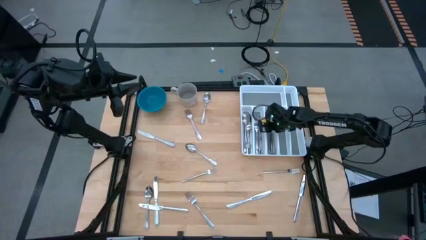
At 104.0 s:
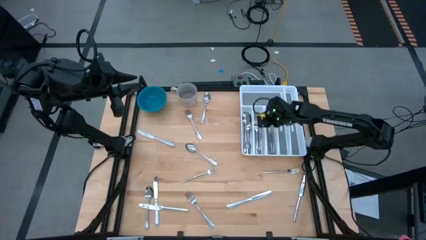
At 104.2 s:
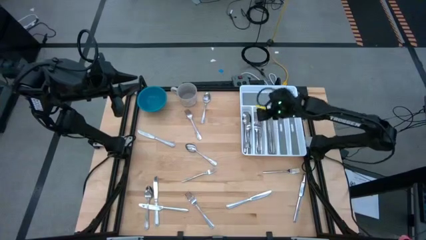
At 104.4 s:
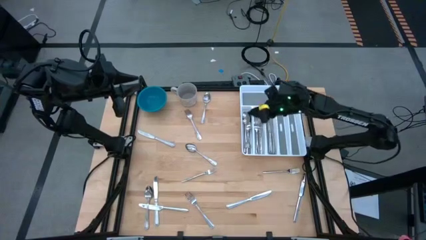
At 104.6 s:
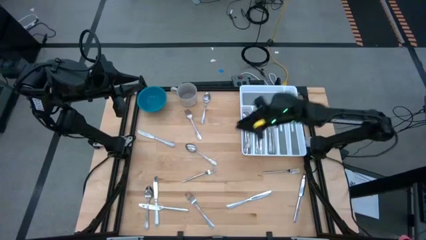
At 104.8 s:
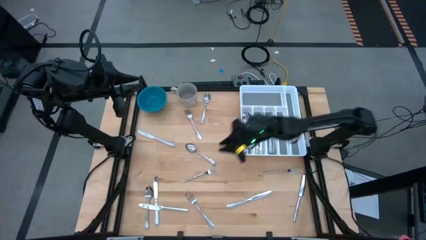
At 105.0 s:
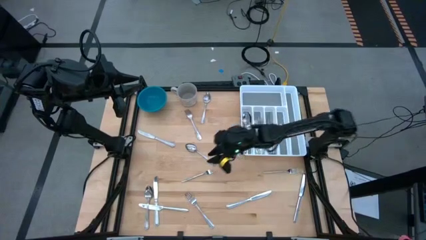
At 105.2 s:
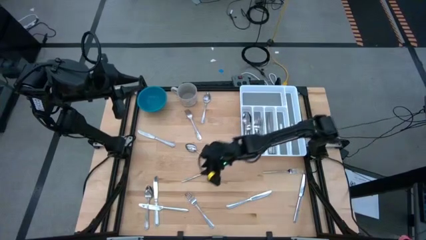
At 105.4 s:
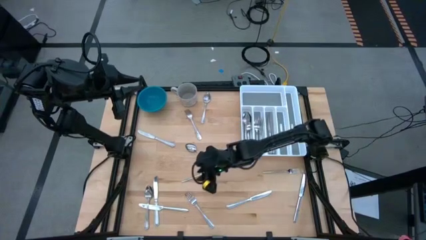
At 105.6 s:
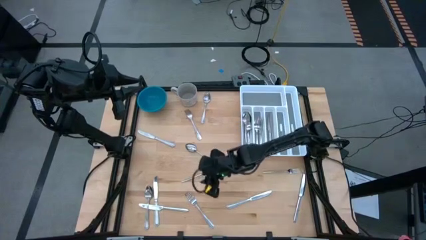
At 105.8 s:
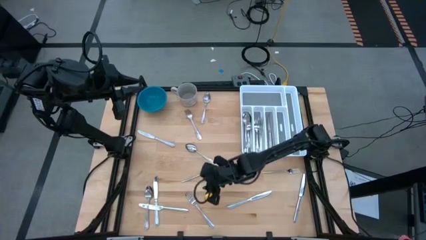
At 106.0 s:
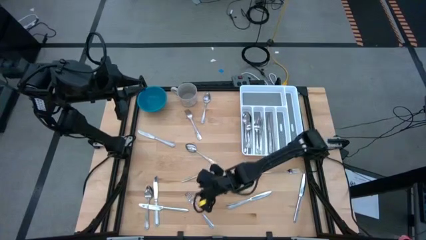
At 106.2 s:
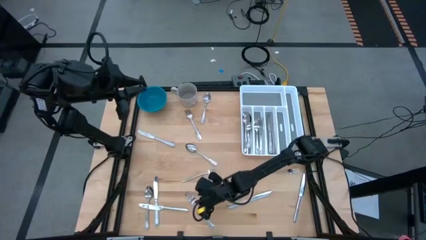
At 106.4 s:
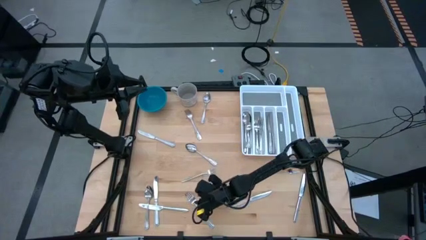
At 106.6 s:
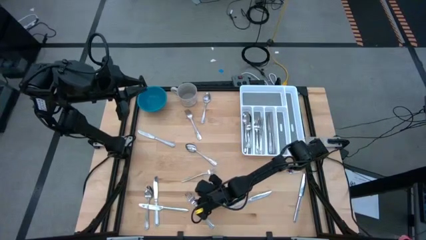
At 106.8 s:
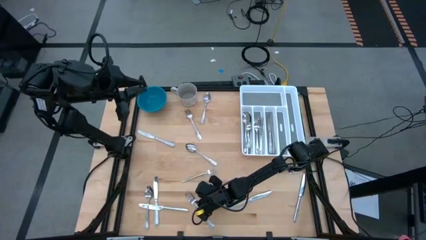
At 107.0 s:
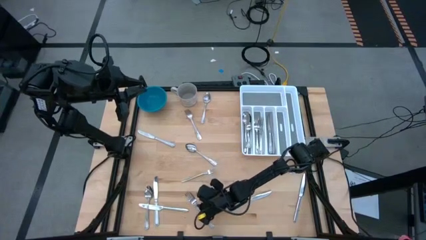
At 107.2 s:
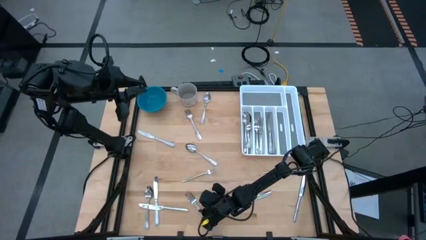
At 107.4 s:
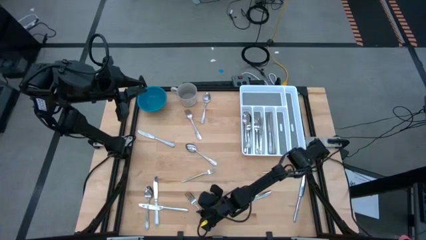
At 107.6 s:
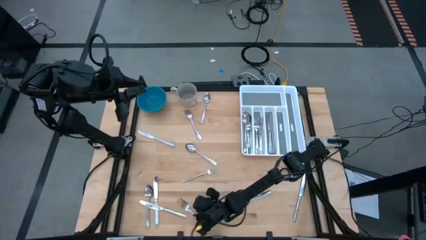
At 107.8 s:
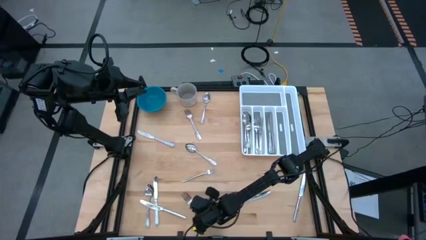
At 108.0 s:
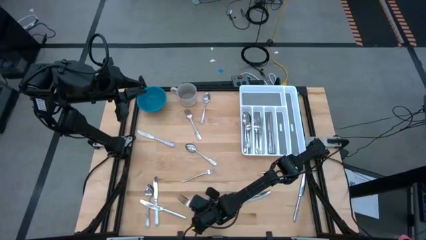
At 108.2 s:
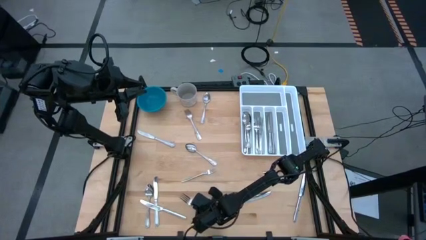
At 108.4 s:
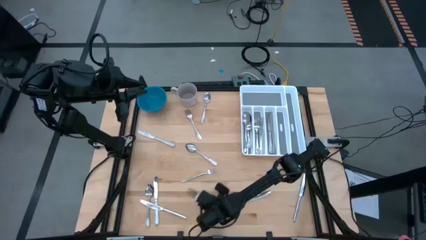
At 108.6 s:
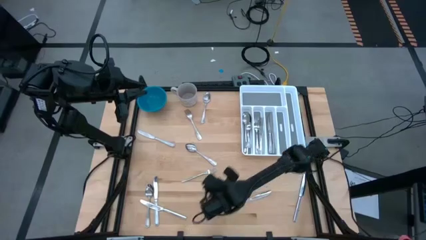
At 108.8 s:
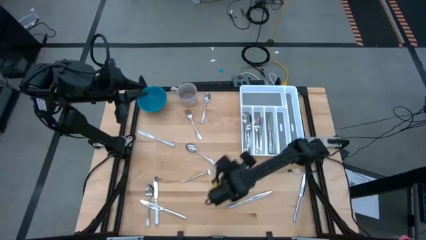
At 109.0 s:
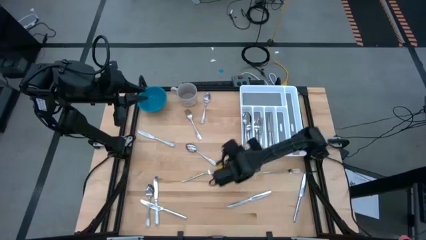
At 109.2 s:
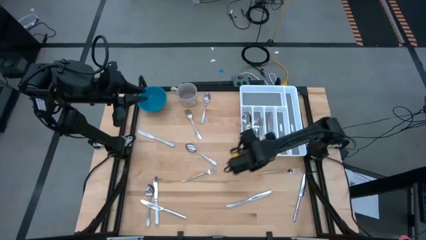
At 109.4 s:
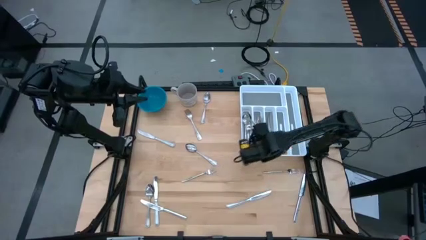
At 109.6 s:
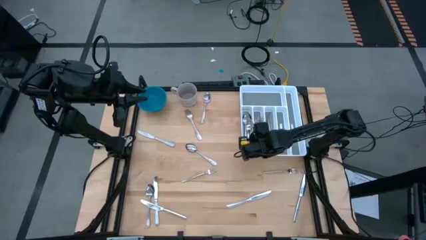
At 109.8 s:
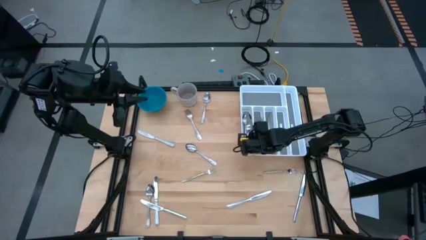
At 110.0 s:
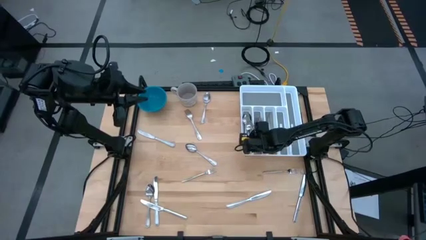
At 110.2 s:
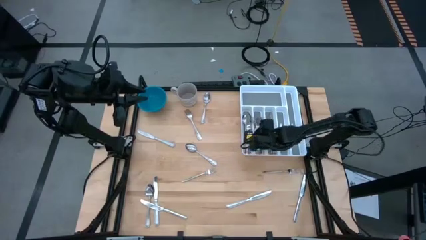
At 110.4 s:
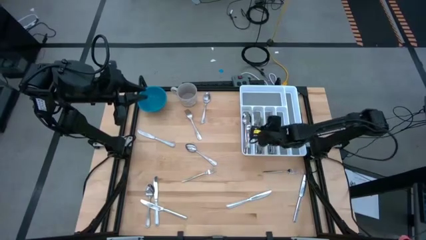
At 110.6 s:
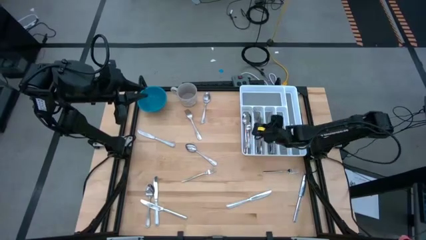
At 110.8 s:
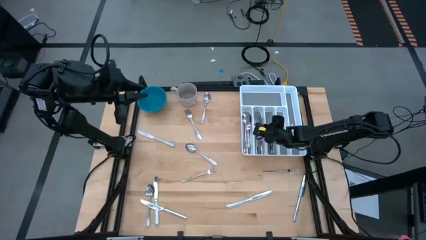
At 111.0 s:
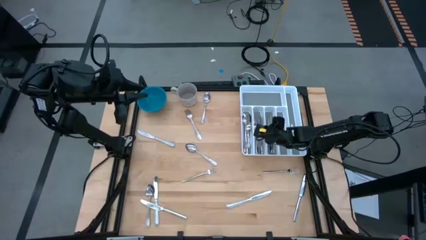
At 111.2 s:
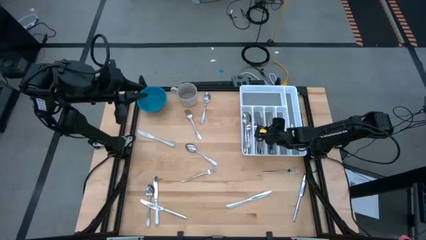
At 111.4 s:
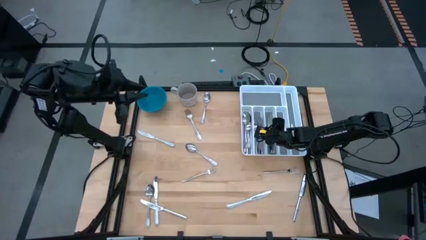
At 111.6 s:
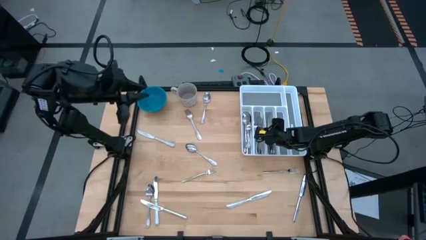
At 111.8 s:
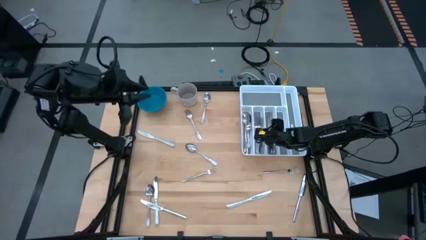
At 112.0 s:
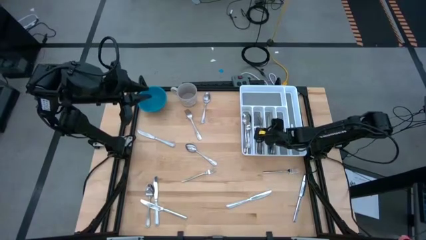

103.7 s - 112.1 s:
Task: Sort silverware
Put the fork in the silverware tray

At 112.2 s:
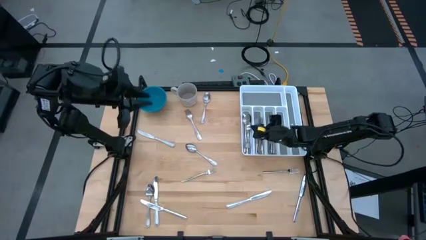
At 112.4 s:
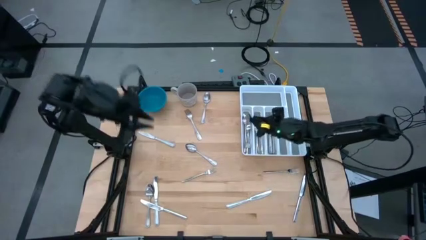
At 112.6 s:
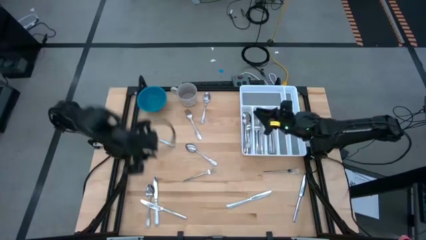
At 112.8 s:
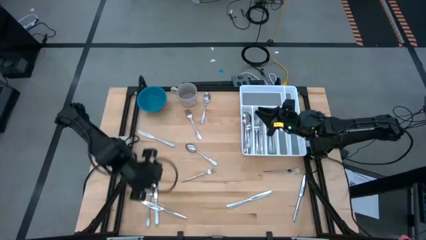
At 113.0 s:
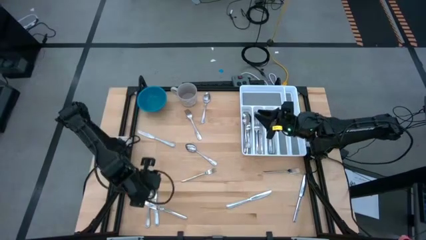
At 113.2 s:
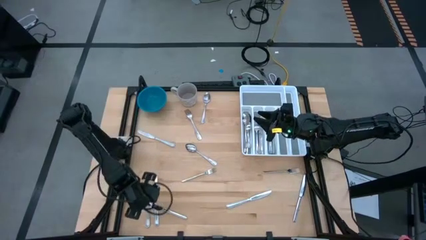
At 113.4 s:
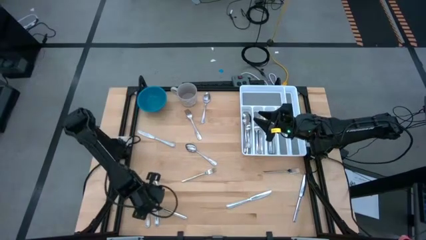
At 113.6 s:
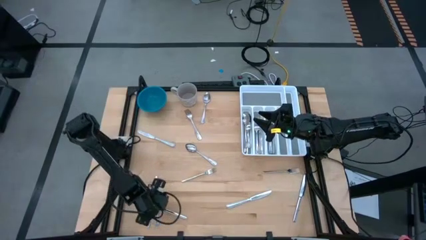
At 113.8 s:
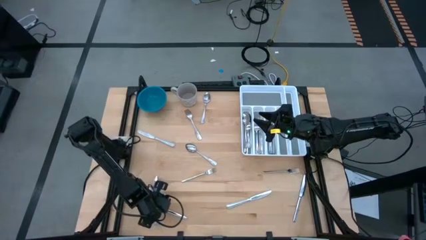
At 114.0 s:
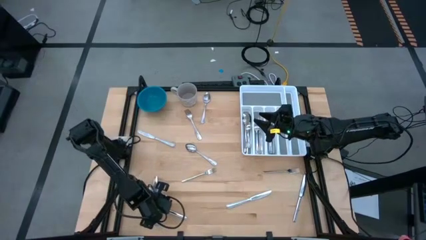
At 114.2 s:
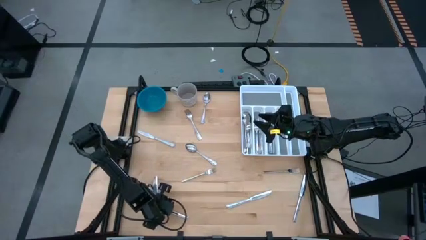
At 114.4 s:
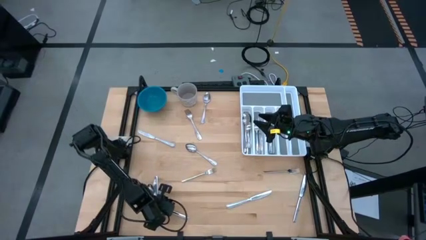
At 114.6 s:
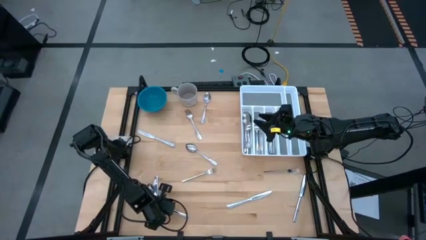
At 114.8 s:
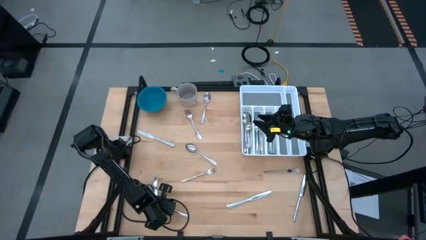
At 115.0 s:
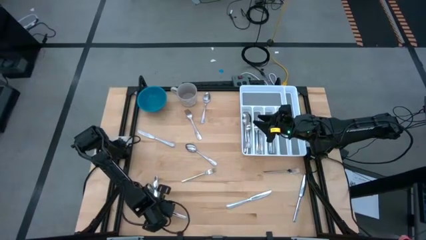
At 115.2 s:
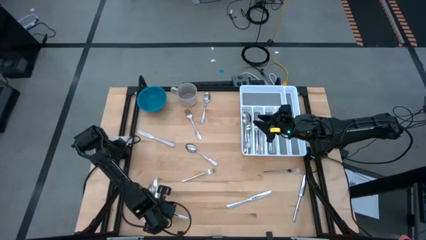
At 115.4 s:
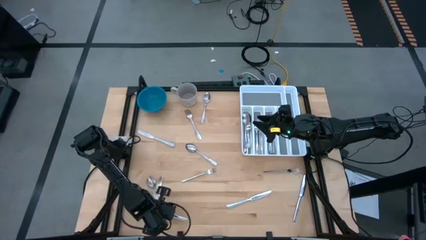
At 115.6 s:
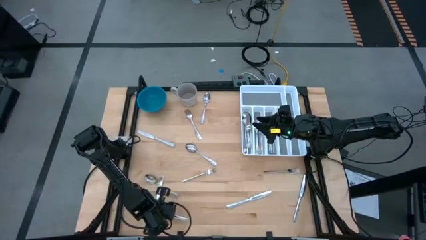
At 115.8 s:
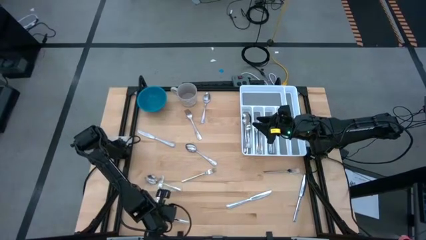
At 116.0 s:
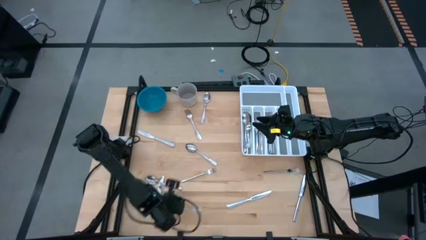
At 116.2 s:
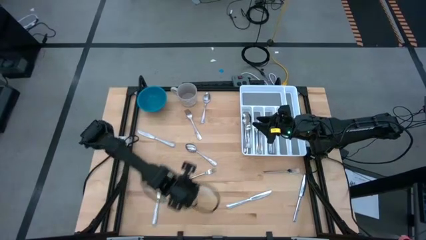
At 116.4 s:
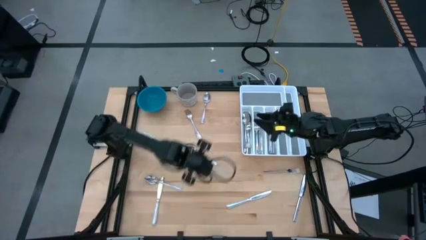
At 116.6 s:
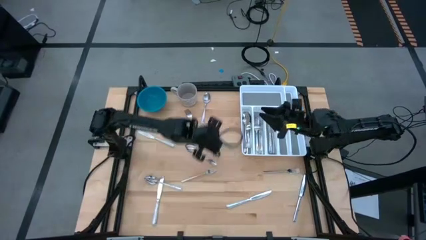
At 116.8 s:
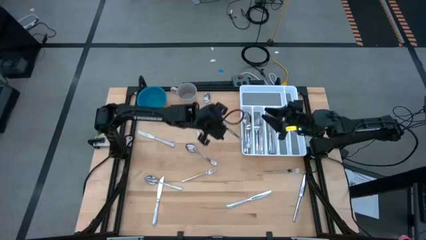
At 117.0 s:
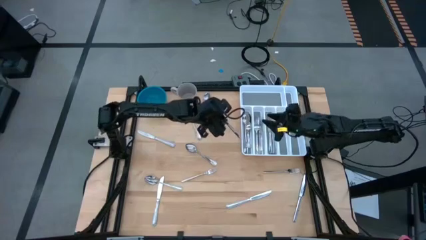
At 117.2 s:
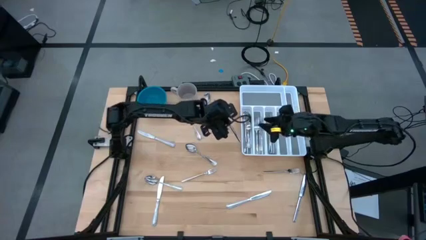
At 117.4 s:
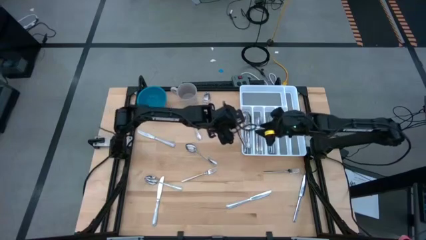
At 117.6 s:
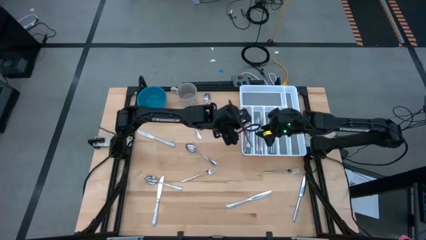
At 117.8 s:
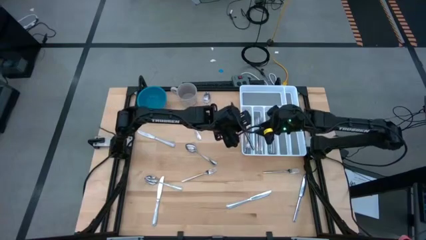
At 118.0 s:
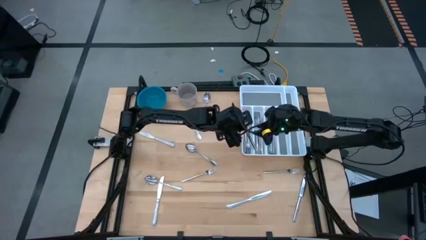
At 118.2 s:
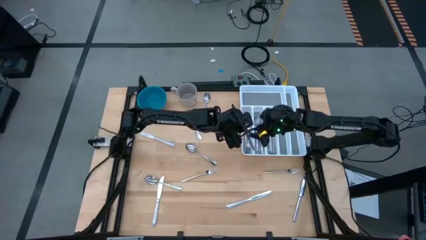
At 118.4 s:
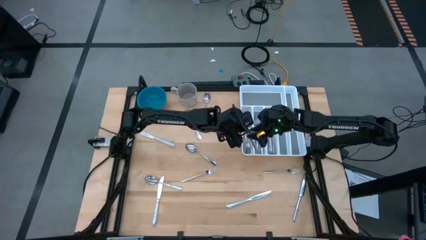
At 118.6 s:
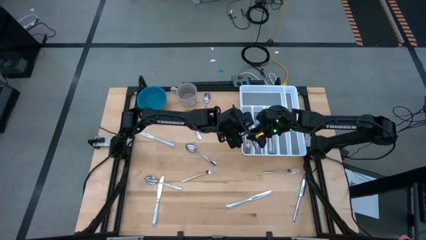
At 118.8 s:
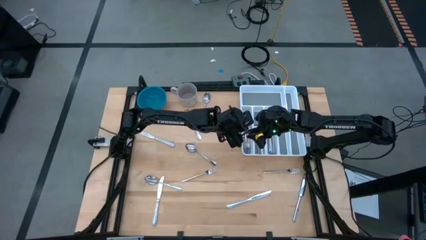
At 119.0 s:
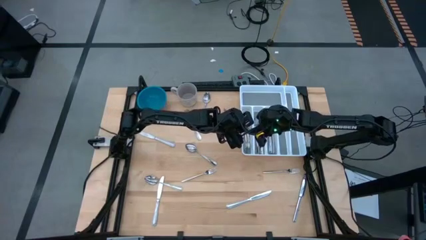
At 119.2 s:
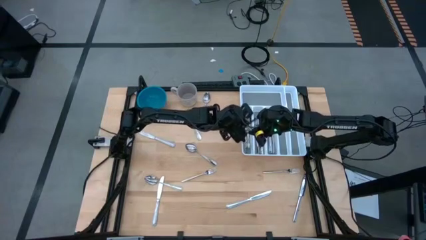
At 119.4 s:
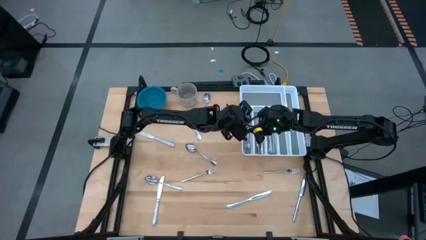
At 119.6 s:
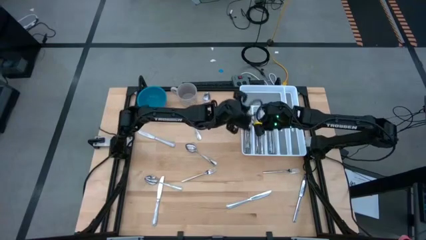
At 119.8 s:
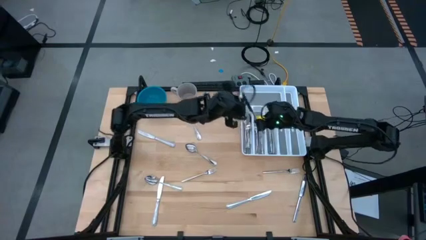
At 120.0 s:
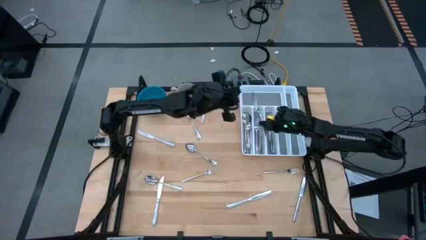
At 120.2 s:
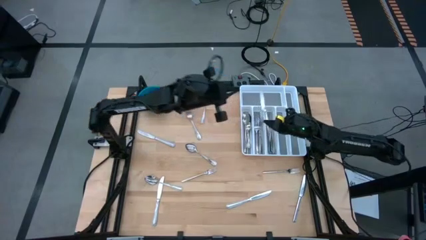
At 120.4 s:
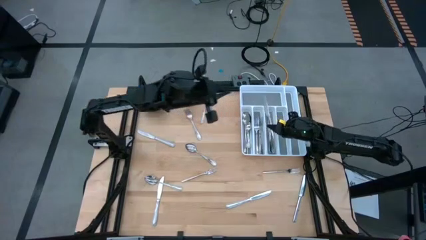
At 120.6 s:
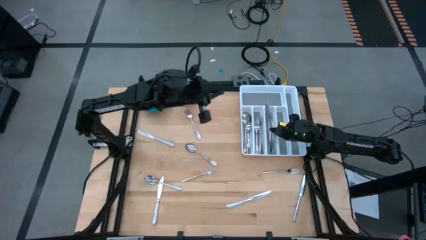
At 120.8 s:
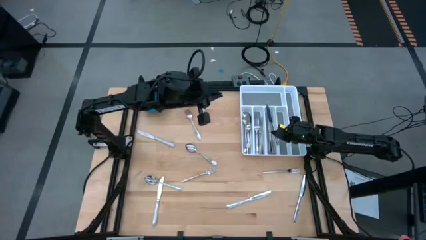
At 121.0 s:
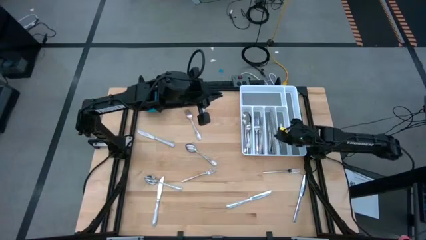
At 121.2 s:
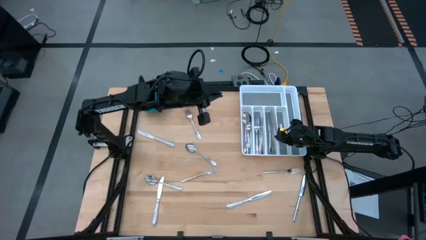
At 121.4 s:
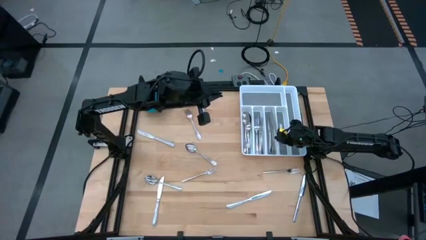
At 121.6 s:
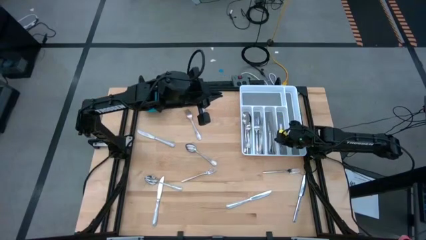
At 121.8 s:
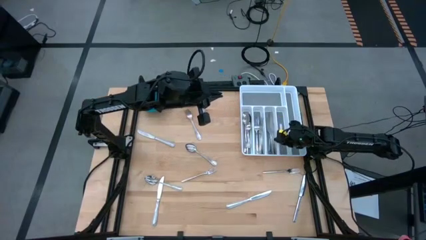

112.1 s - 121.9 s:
Put the table knife in the silverware tray
